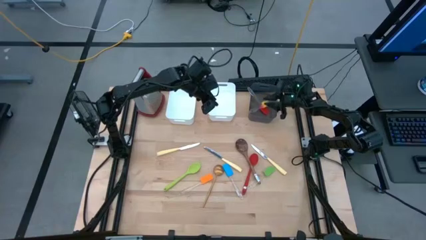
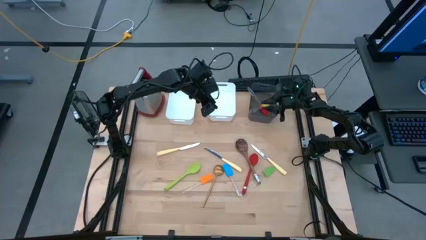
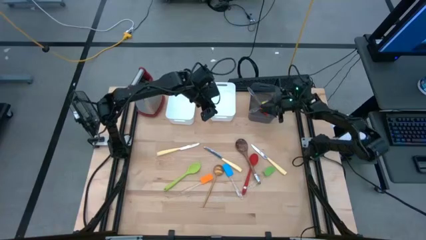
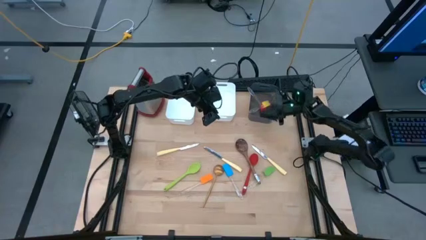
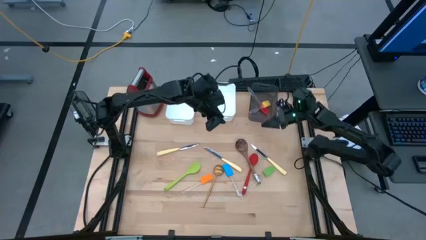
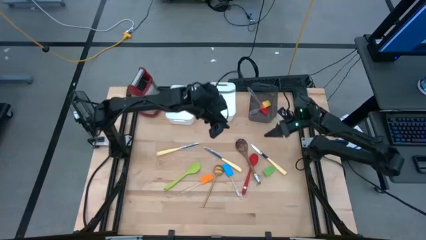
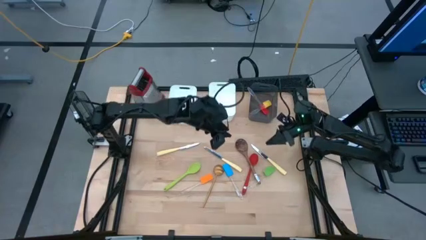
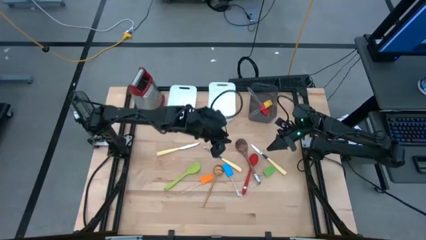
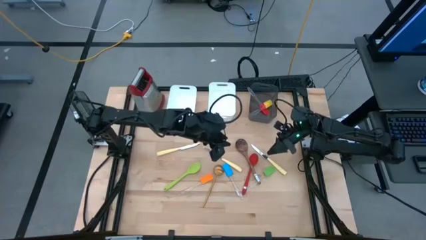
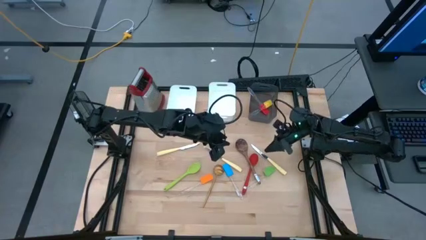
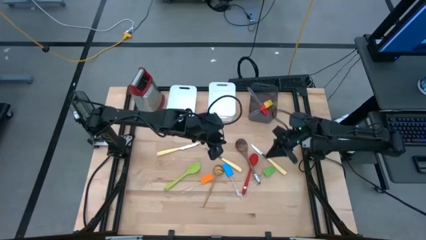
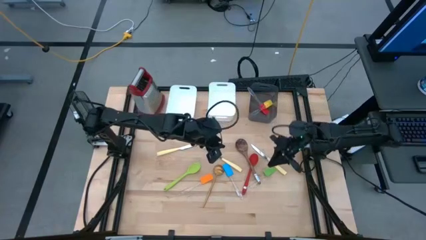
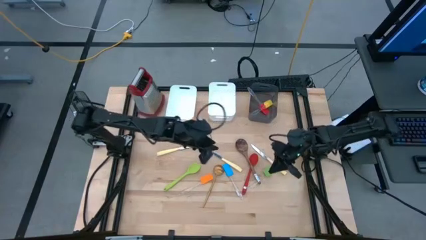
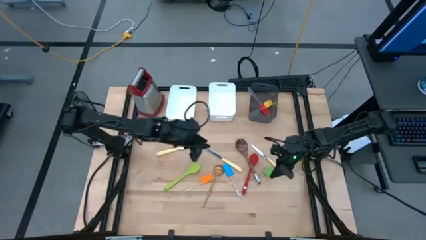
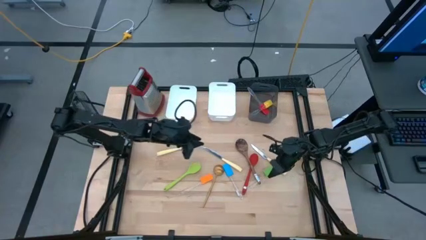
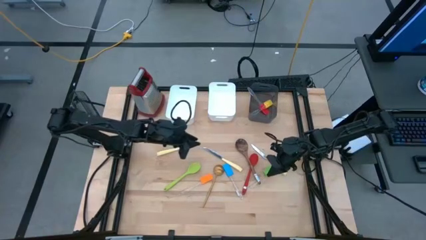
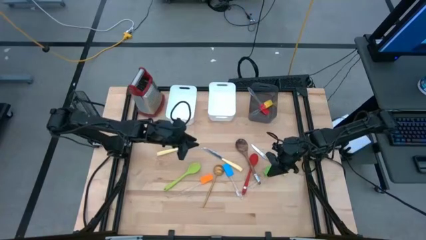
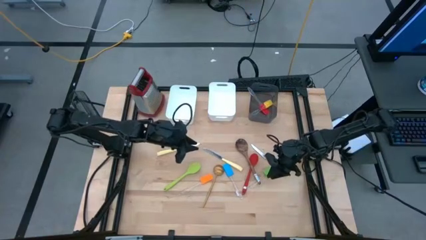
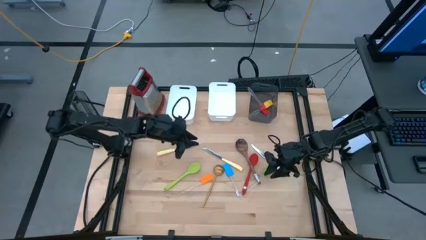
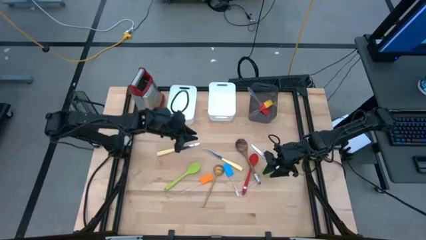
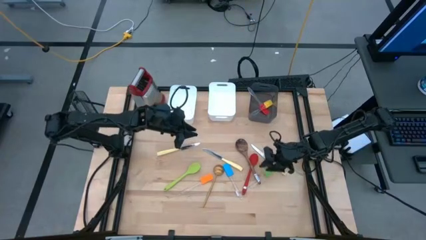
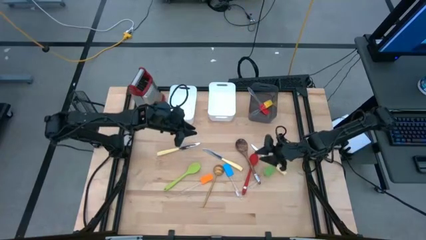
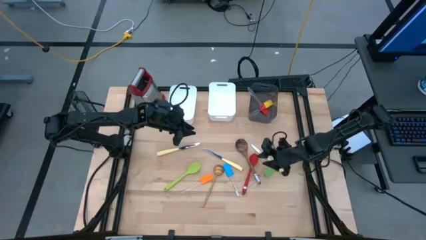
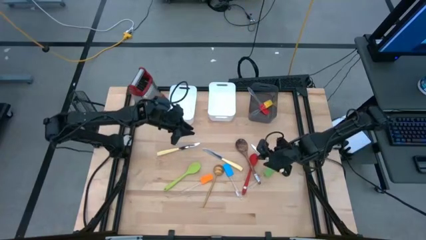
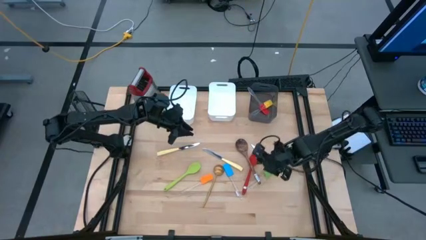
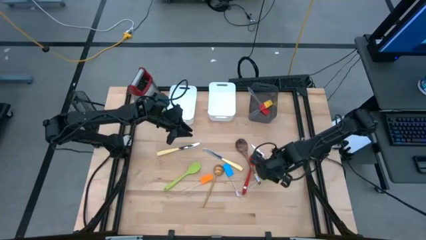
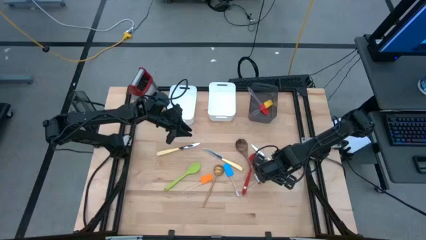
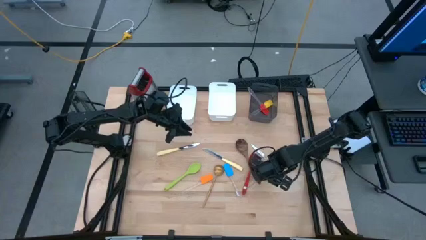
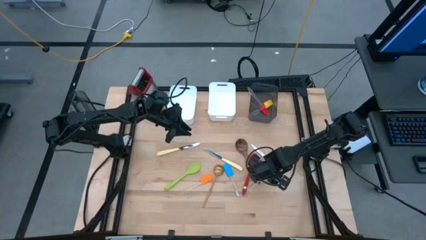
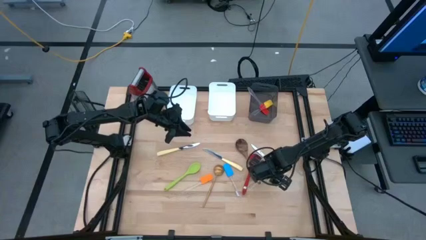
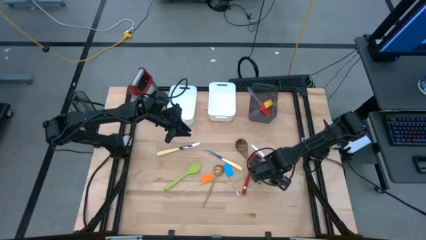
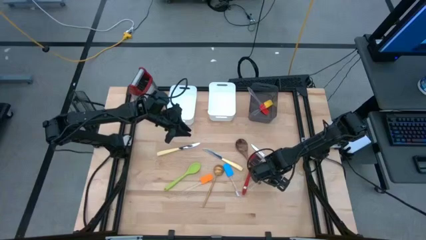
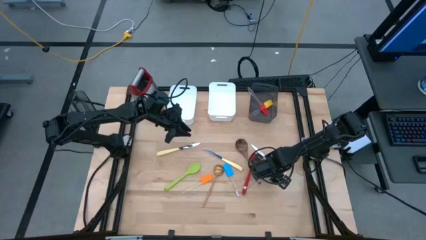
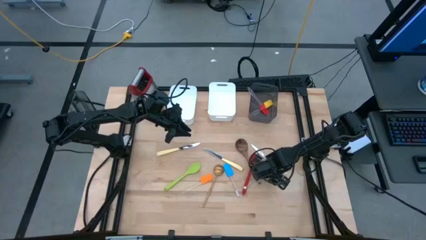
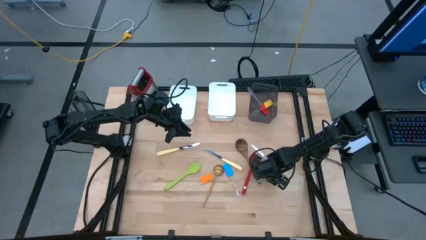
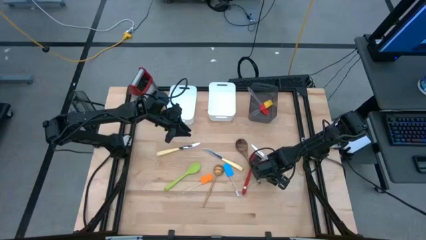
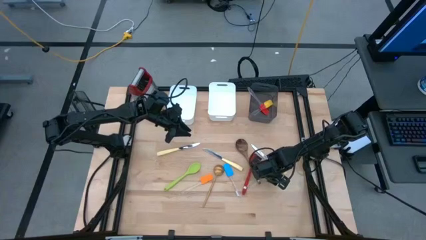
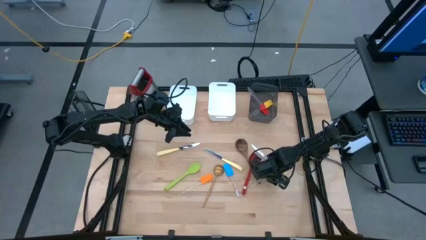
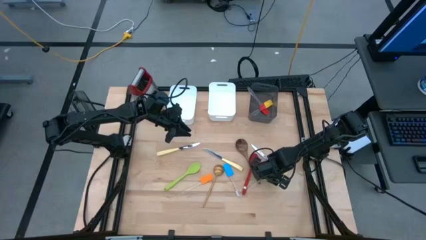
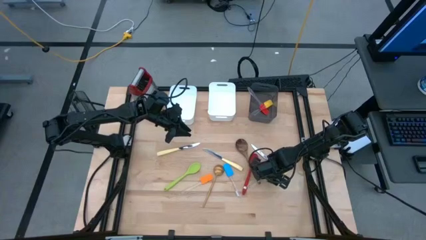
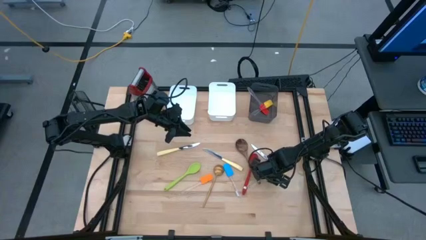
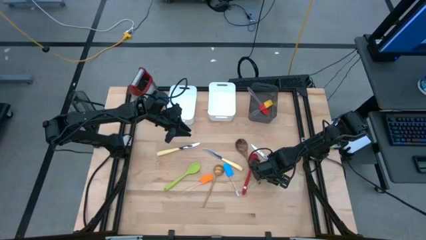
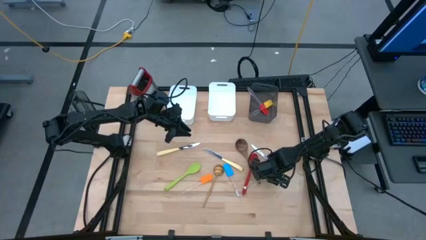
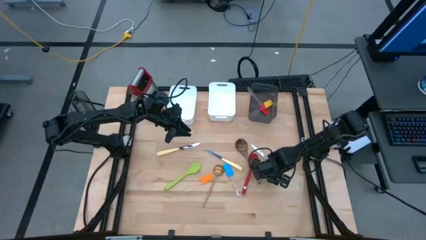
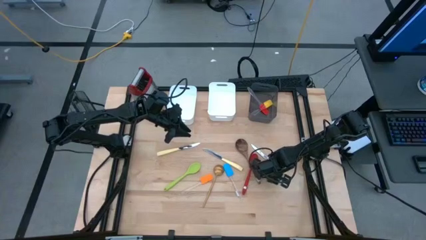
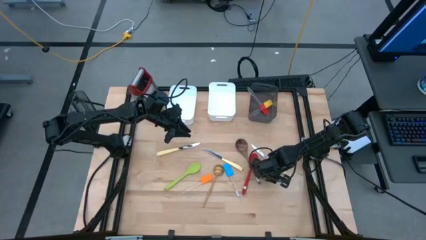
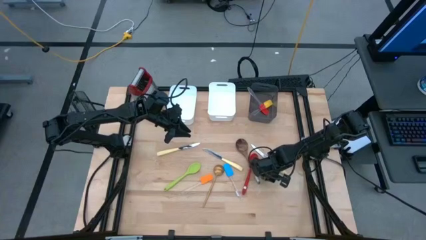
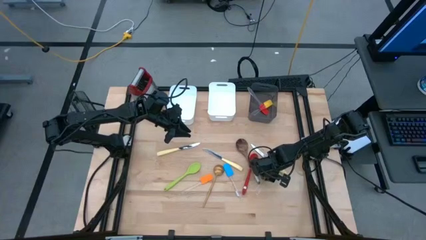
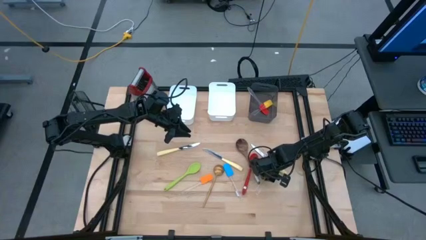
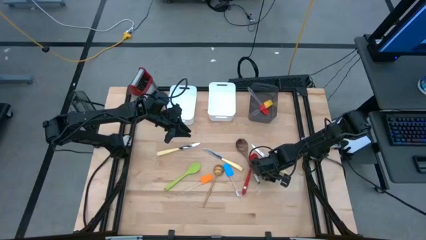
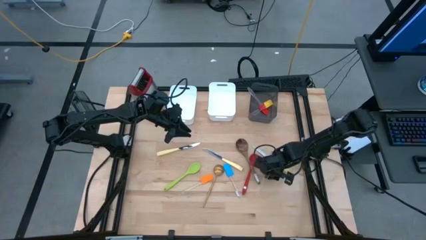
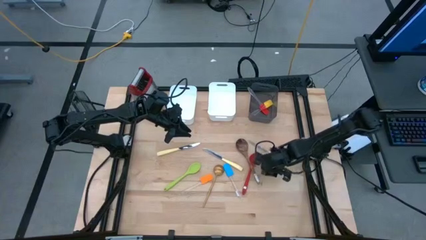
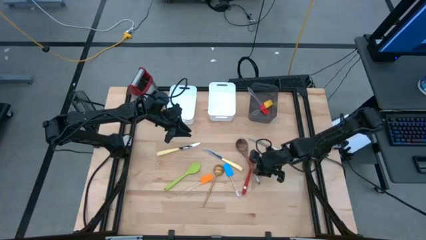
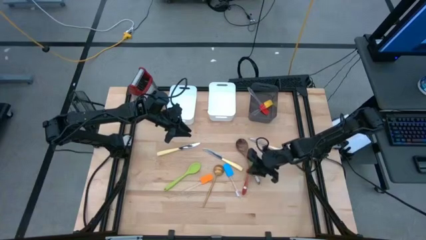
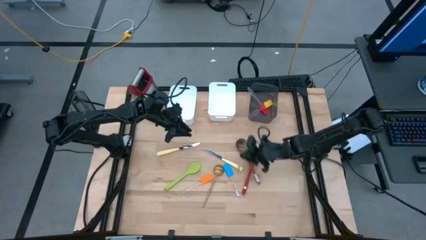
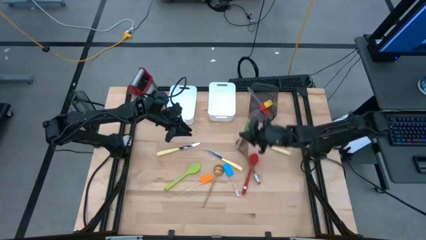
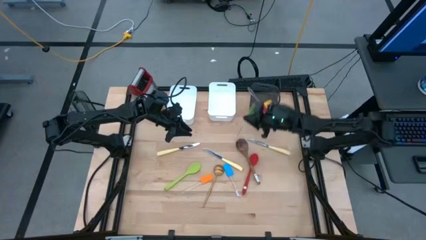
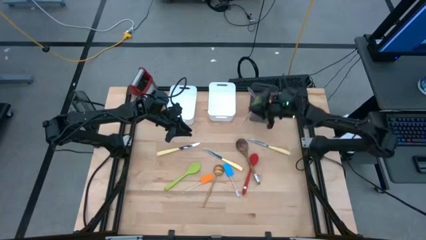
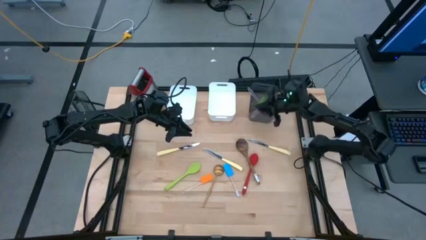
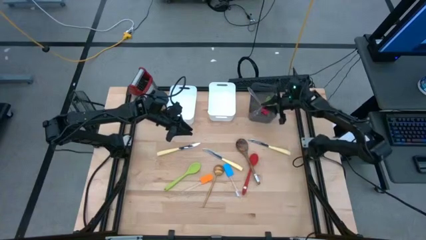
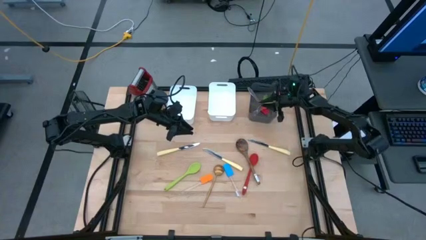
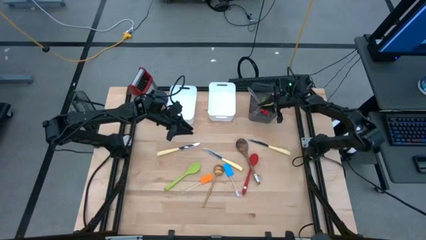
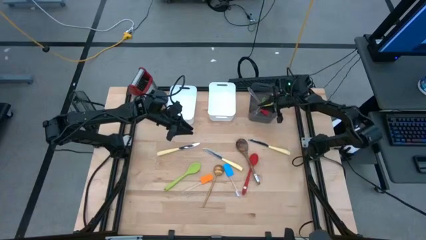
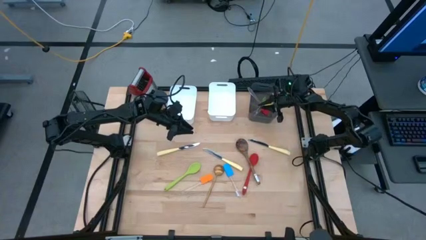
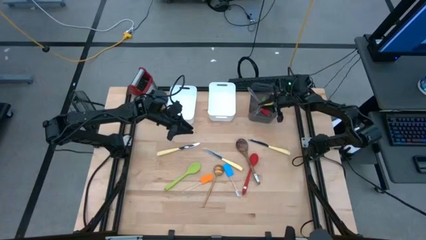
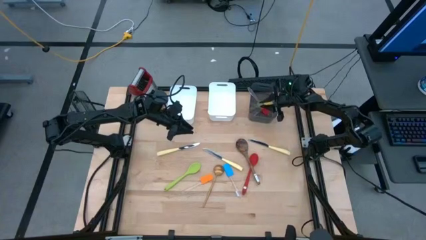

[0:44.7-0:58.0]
Task: Pick & Place Kitchen Items
Put the green spatula into the black bin
